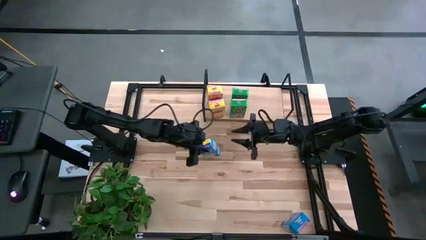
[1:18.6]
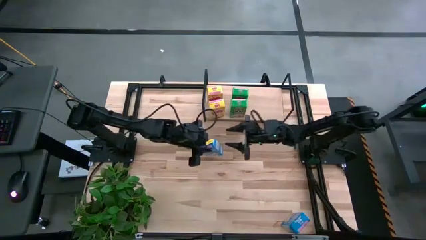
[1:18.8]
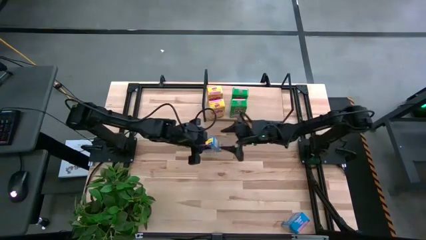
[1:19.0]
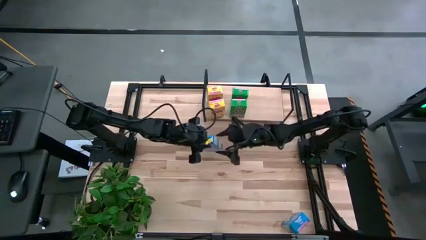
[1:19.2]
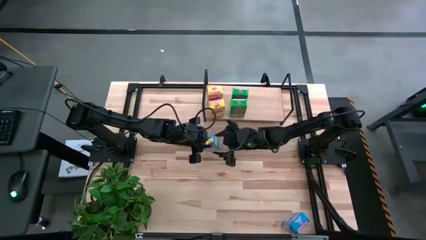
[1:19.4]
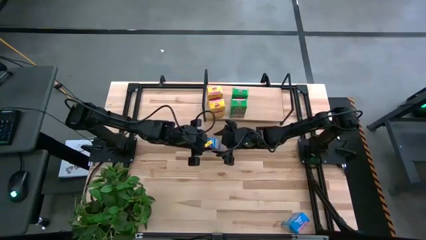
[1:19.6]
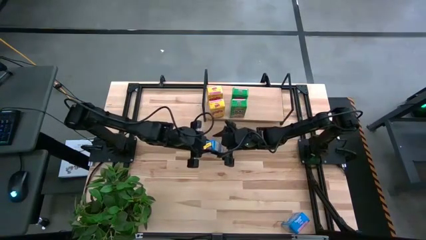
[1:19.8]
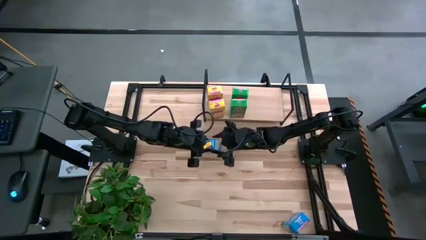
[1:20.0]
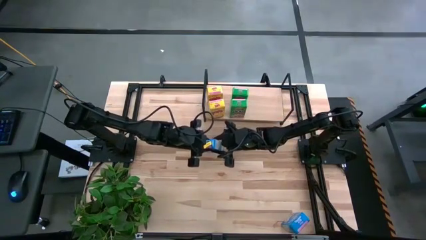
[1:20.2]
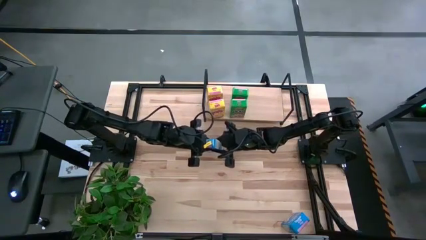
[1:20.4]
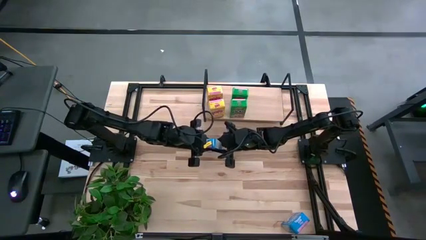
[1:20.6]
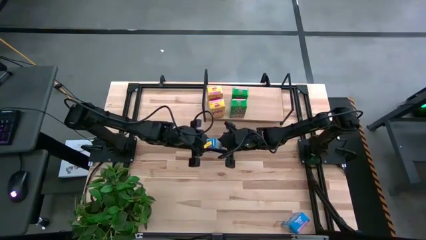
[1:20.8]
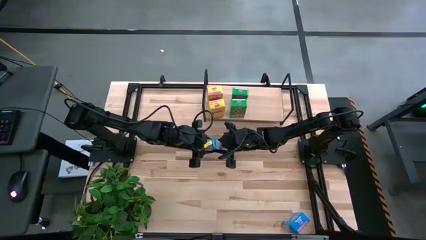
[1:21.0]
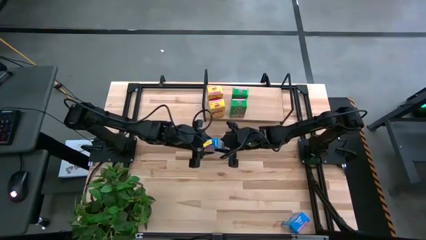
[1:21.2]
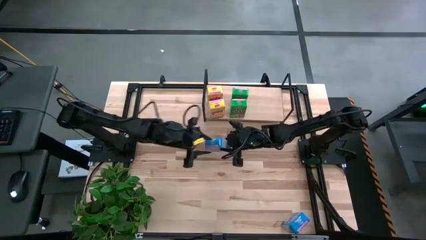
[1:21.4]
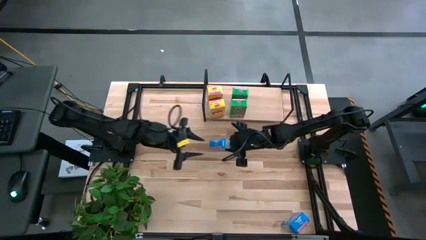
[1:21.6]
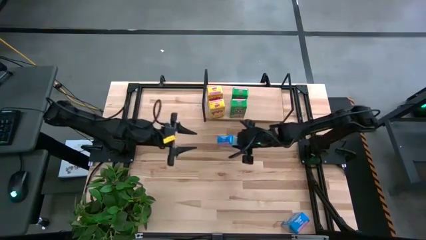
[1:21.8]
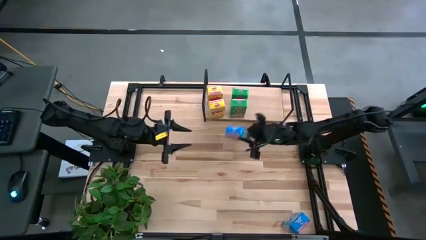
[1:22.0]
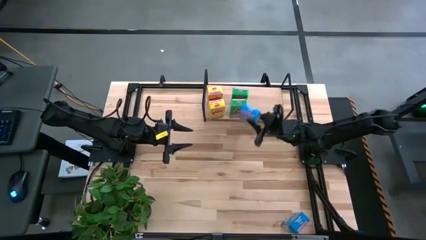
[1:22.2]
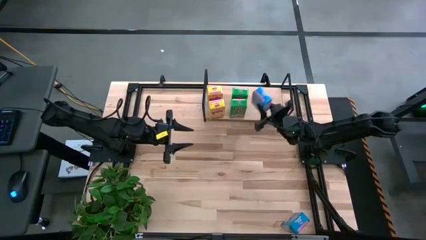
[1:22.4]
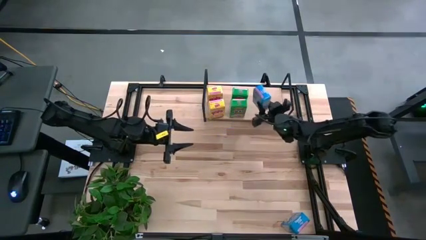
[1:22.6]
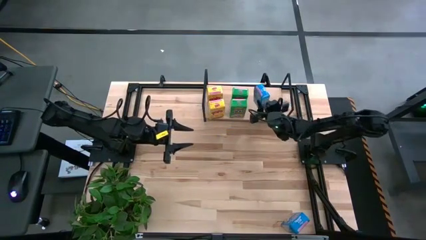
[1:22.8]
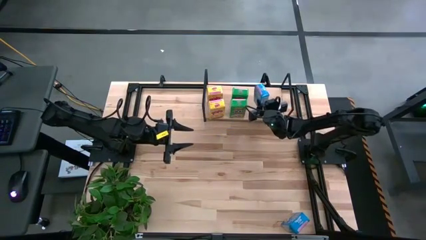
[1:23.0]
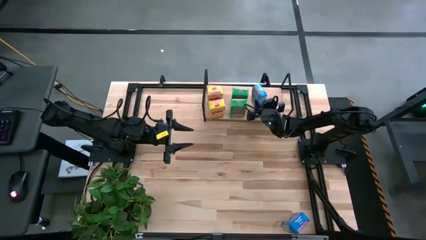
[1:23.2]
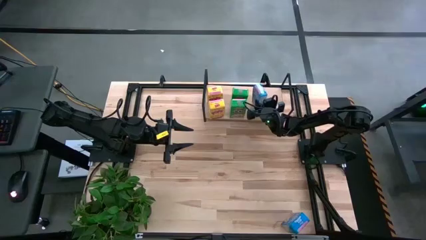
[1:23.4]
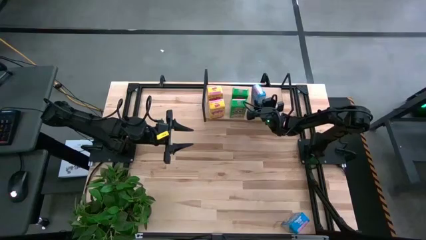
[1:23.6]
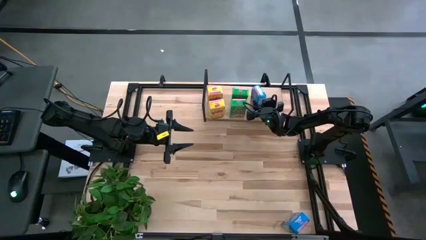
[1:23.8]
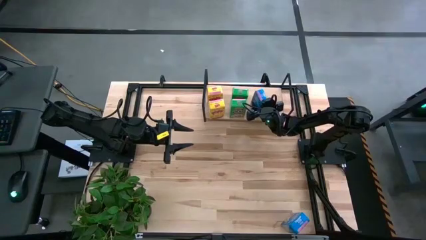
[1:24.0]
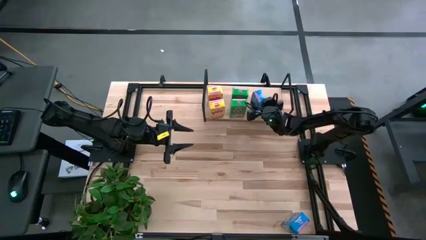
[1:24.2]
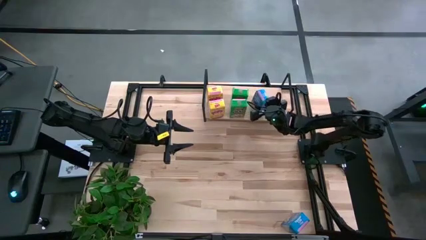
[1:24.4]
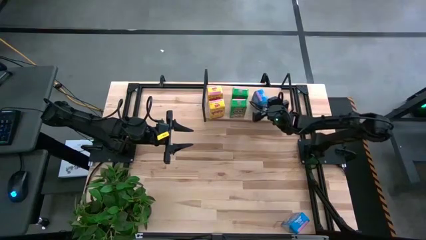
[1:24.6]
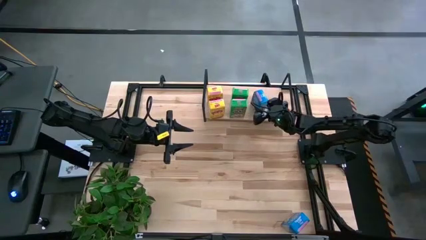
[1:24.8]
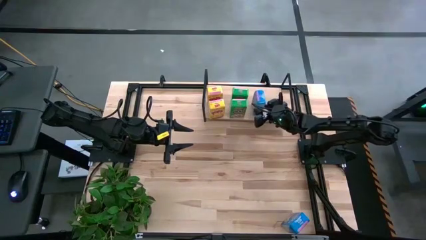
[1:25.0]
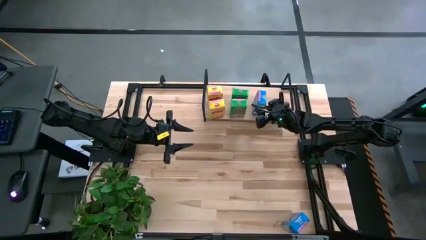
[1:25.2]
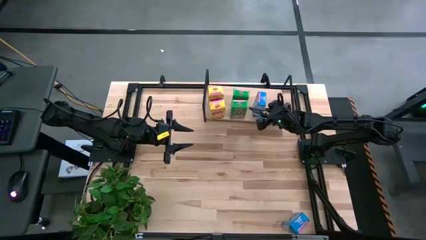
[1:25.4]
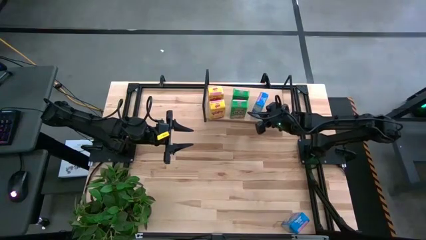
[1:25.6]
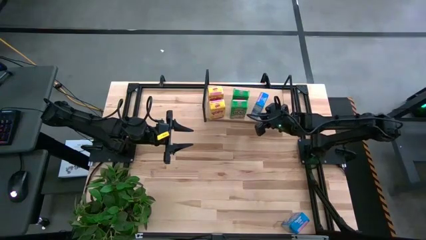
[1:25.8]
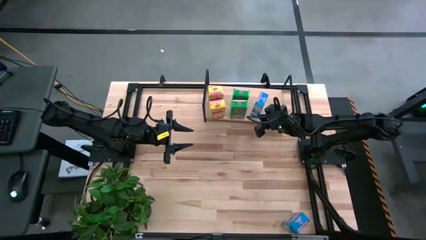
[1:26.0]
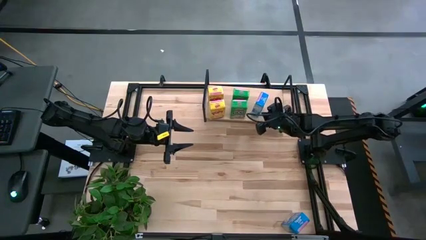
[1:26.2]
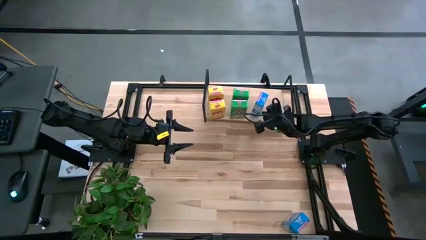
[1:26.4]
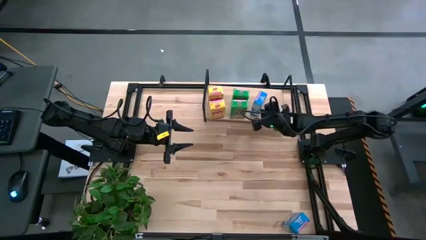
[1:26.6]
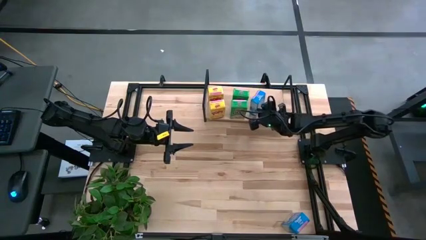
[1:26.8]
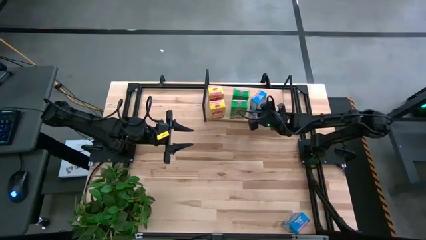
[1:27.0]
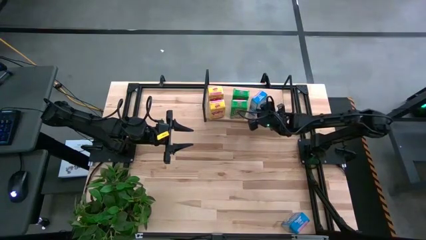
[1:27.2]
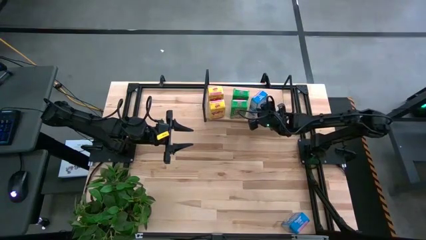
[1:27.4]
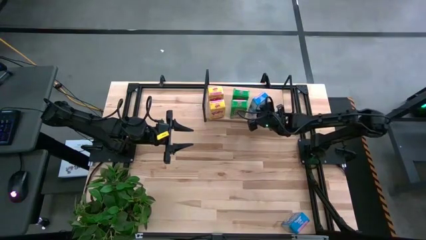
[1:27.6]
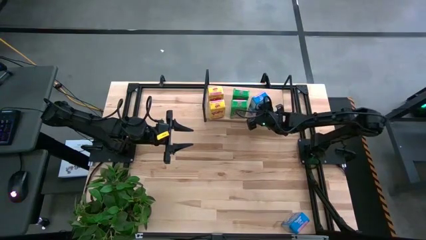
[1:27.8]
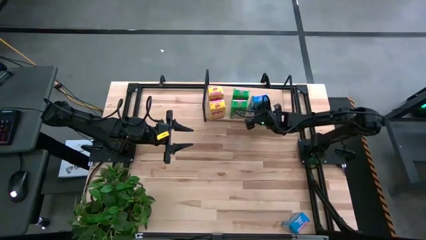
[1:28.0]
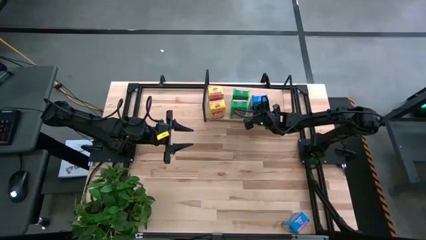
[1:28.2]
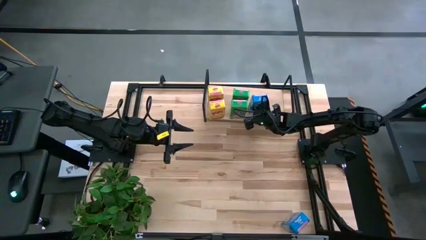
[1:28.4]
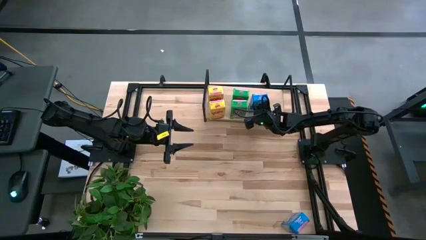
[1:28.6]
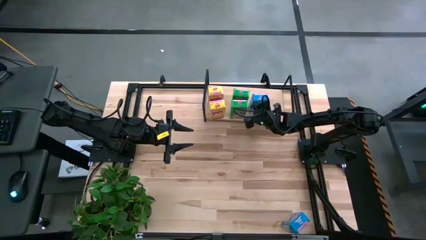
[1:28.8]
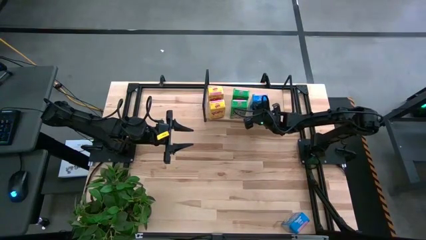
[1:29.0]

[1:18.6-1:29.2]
Task: Stack cereal on shelf
Put the top blue cereal box on the shelf

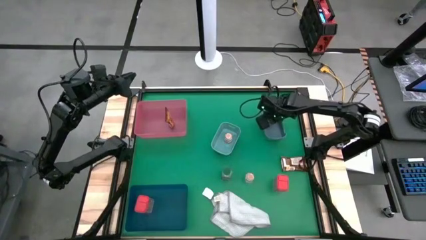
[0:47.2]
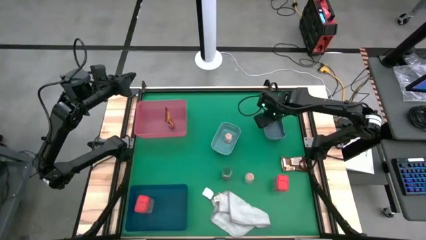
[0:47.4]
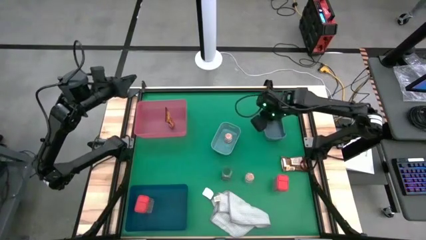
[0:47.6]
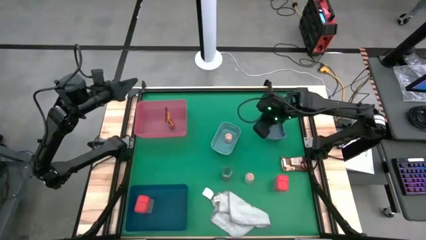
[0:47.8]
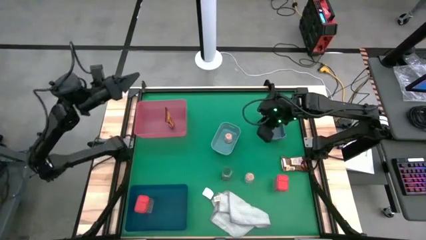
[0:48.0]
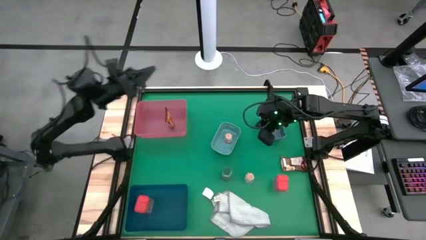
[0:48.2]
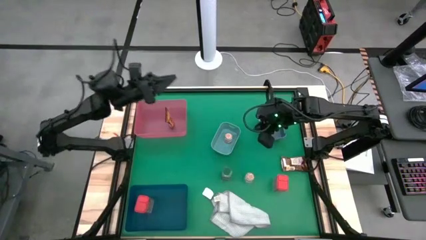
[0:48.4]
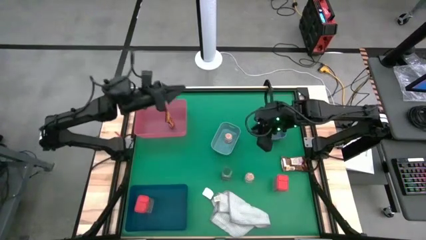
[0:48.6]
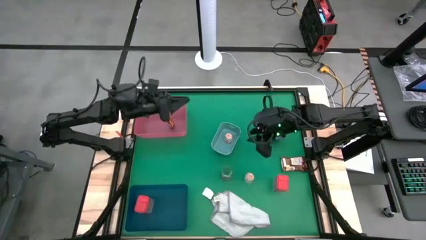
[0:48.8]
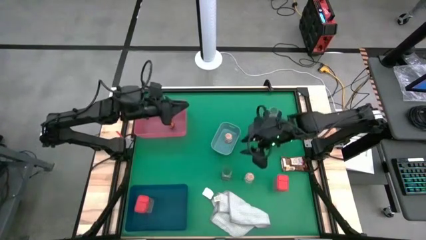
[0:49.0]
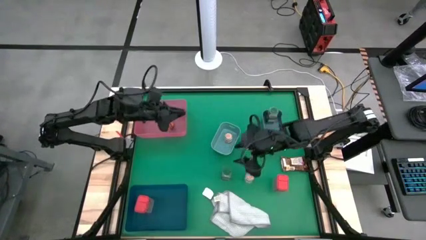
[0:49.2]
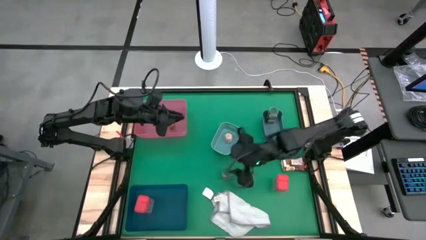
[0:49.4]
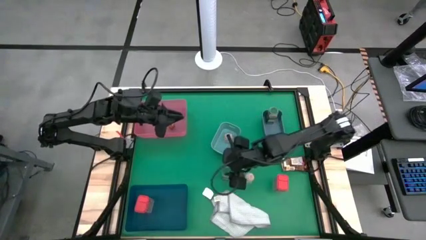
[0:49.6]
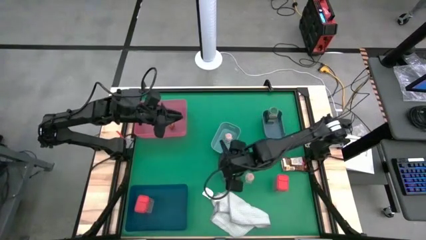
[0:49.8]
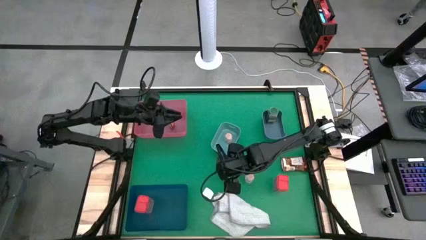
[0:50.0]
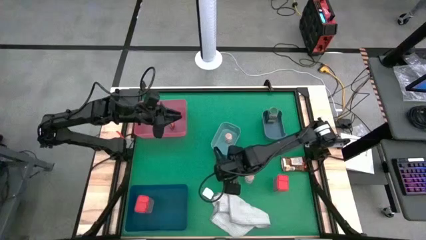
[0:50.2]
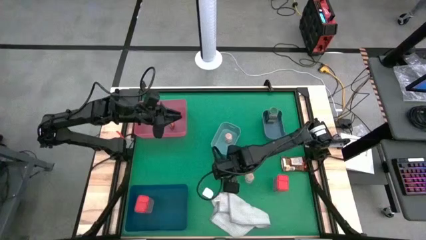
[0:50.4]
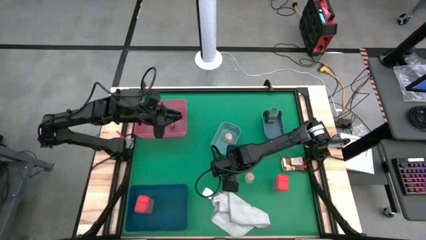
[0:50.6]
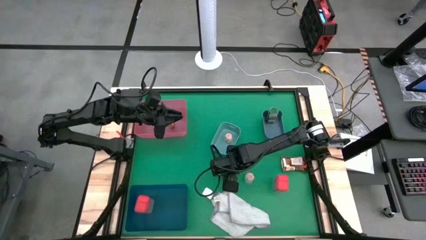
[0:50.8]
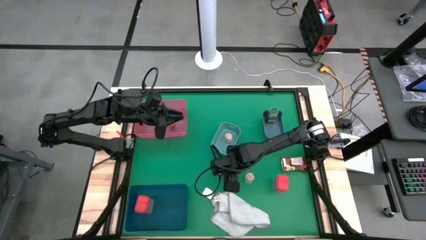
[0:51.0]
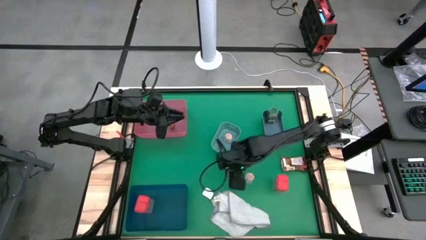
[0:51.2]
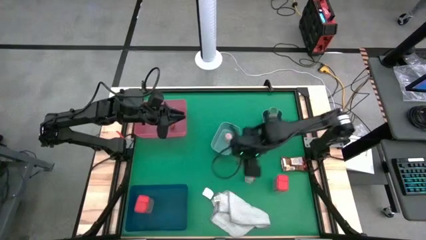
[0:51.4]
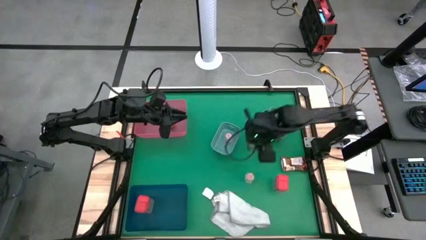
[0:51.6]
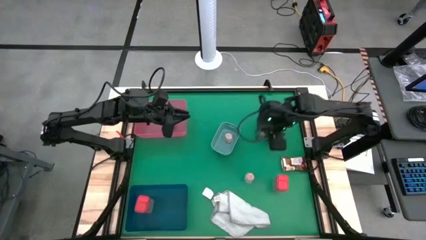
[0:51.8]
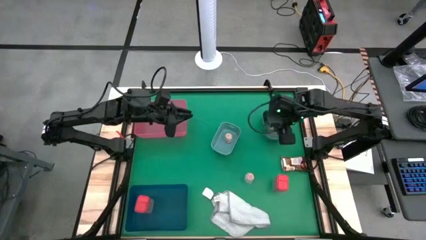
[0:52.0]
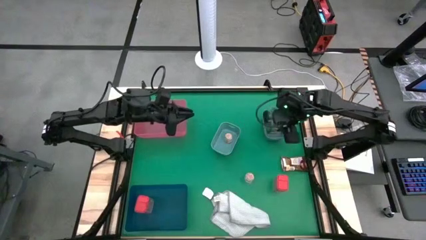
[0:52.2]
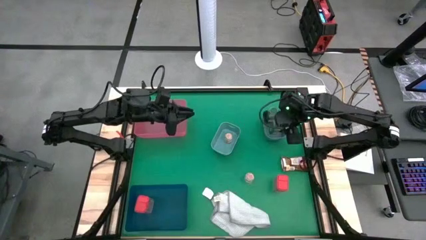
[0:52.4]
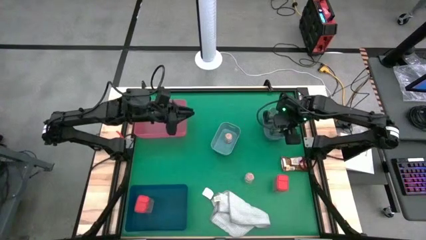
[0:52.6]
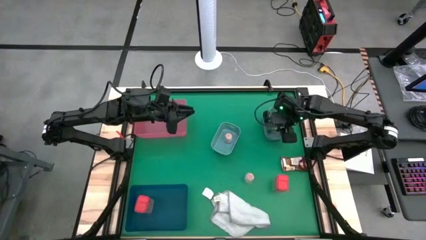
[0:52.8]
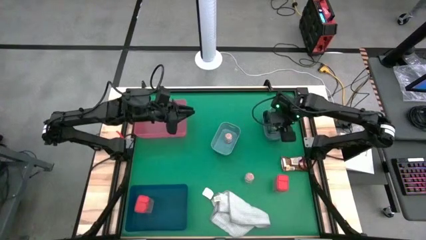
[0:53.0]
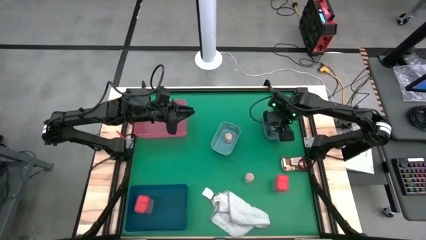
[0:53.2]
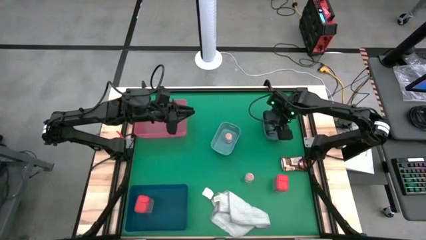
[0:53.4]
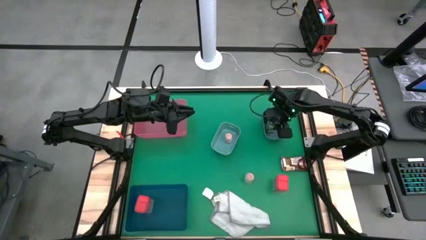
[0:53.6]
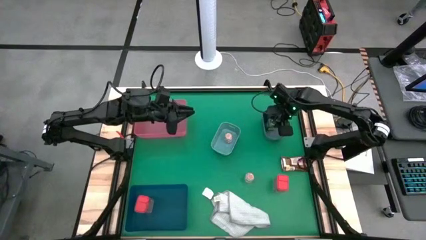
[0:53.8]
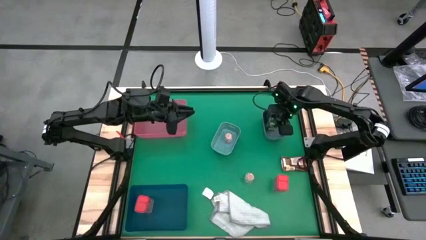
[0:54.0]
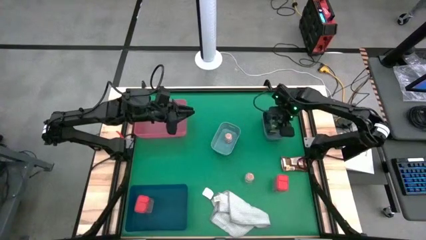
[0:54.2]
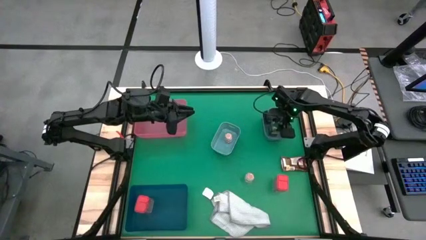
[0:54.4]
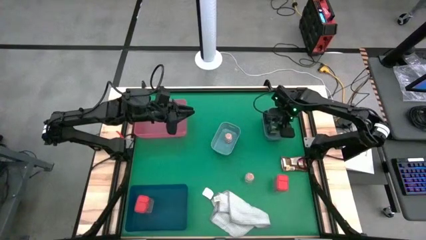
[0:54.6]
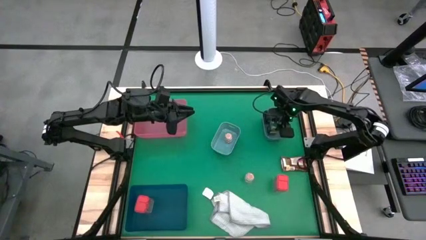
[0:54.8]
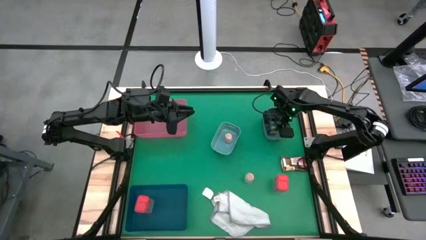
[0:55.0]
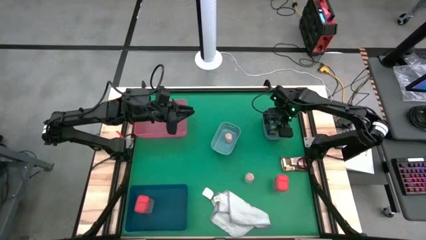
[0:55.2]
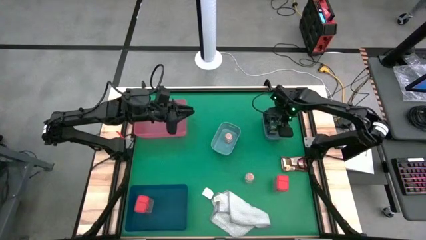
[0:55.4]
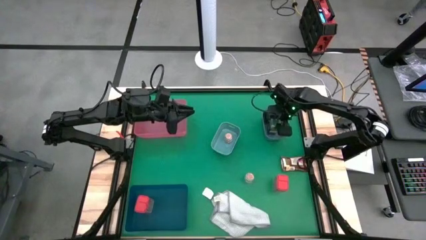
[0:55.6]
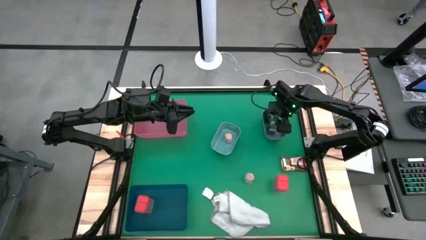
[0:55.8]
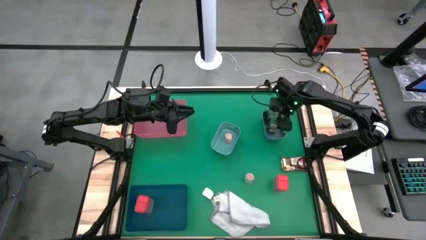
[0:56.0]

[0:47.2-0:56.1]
Task: Sort spices by type
Put the green seasoning bottle into the blue bin
